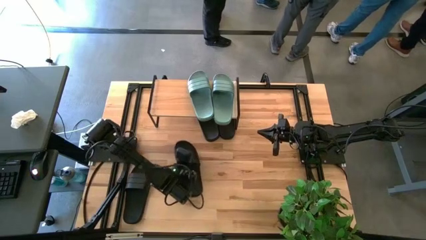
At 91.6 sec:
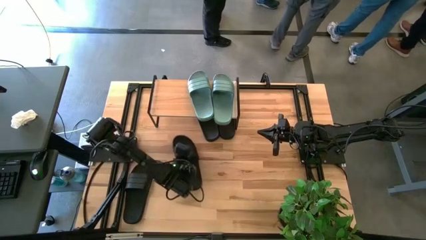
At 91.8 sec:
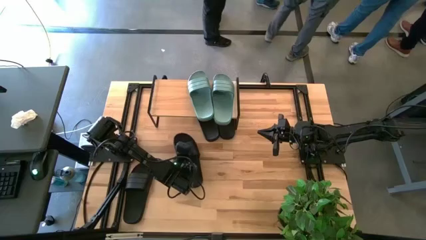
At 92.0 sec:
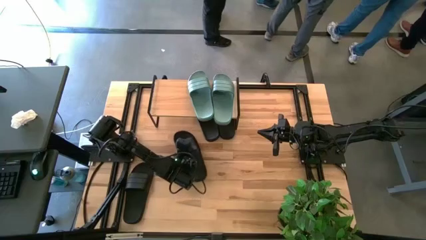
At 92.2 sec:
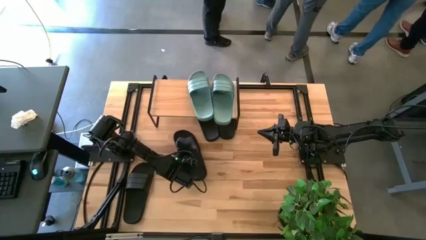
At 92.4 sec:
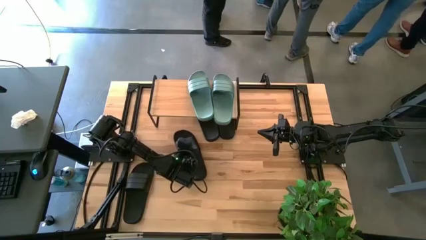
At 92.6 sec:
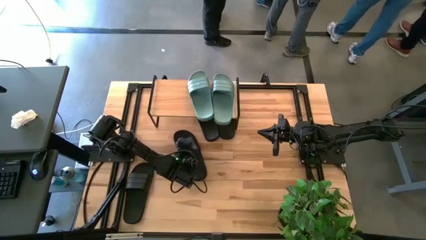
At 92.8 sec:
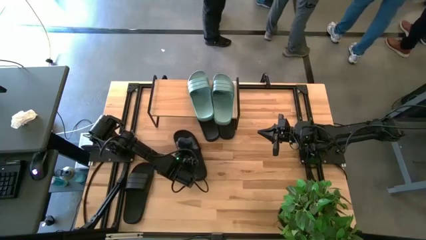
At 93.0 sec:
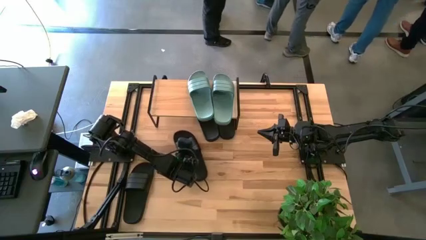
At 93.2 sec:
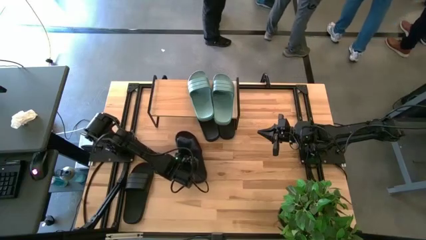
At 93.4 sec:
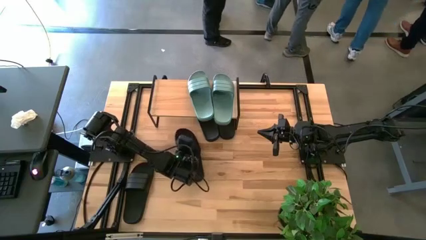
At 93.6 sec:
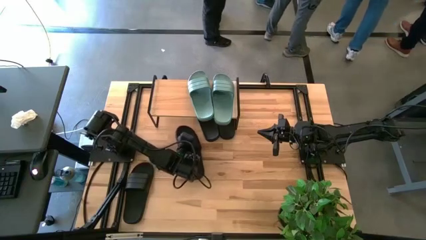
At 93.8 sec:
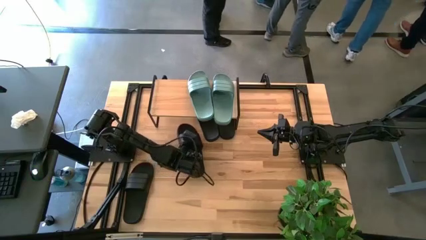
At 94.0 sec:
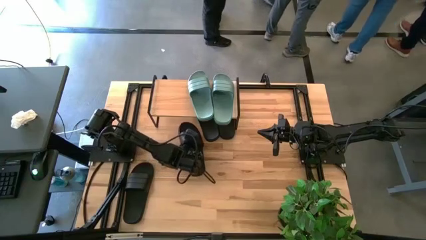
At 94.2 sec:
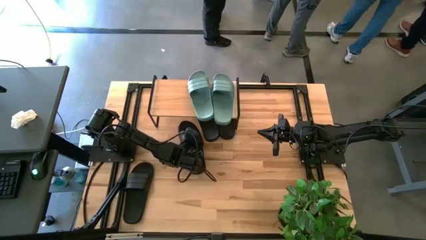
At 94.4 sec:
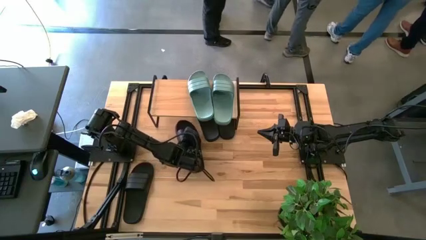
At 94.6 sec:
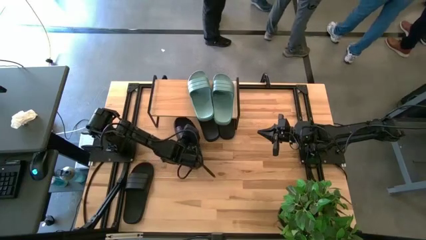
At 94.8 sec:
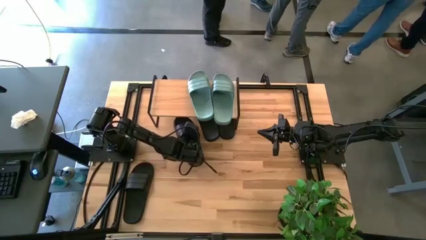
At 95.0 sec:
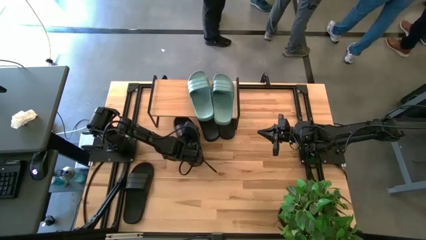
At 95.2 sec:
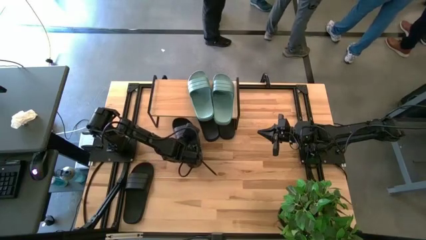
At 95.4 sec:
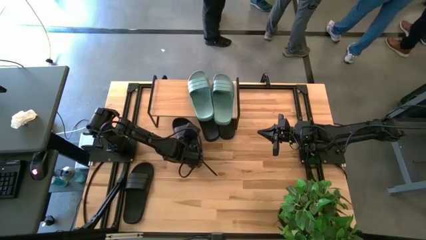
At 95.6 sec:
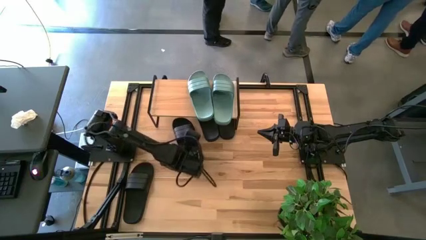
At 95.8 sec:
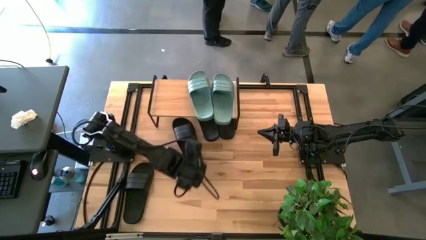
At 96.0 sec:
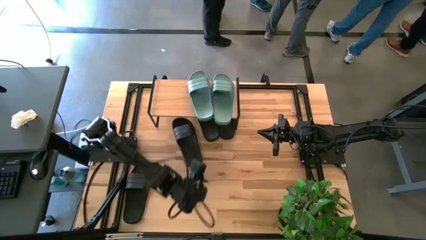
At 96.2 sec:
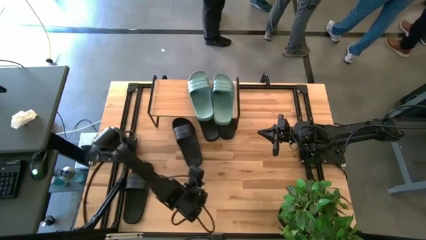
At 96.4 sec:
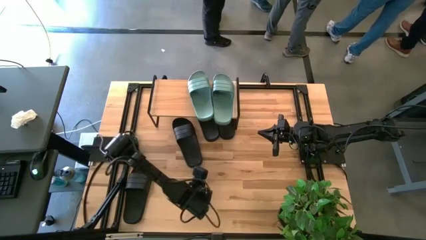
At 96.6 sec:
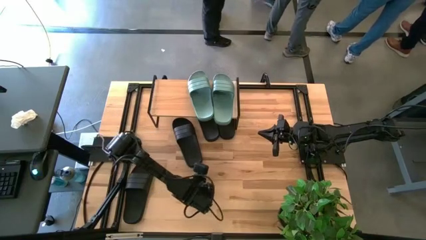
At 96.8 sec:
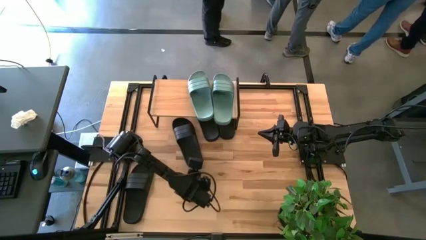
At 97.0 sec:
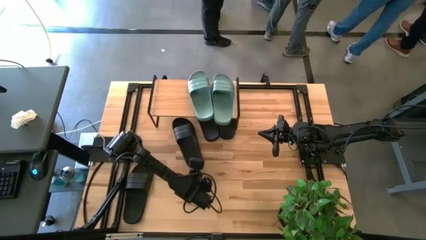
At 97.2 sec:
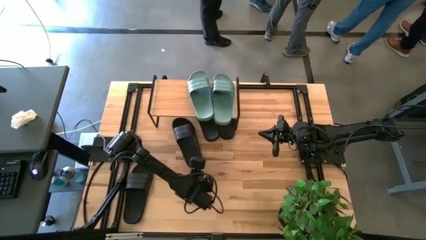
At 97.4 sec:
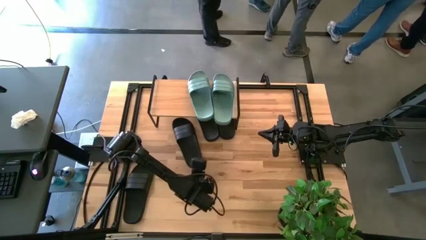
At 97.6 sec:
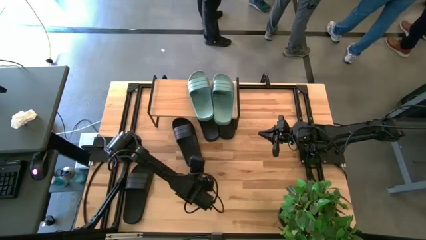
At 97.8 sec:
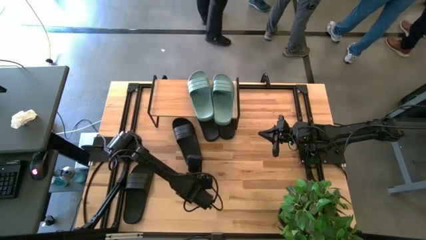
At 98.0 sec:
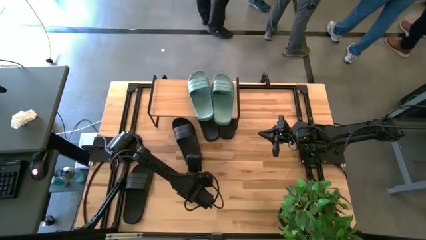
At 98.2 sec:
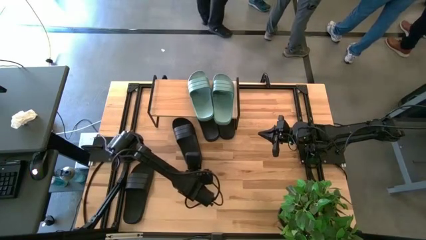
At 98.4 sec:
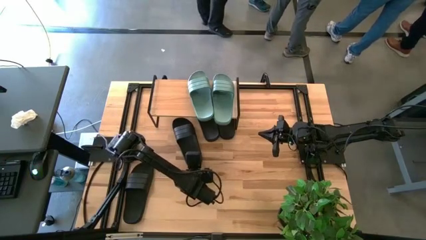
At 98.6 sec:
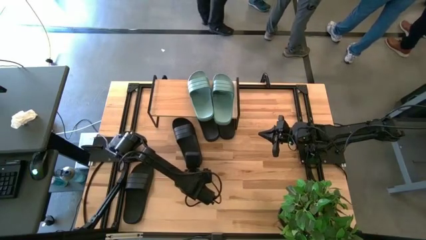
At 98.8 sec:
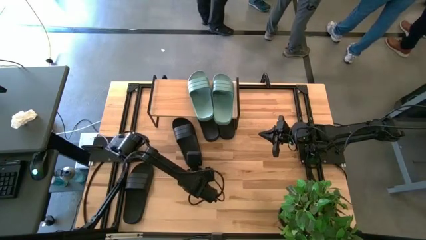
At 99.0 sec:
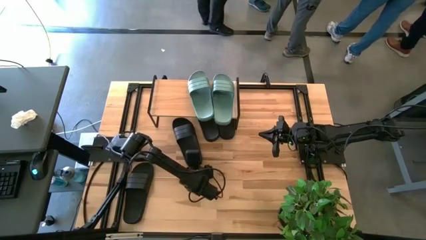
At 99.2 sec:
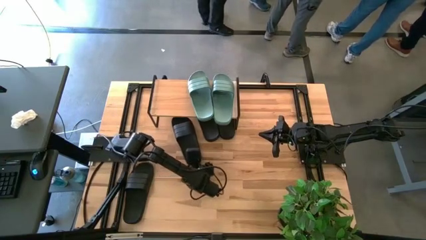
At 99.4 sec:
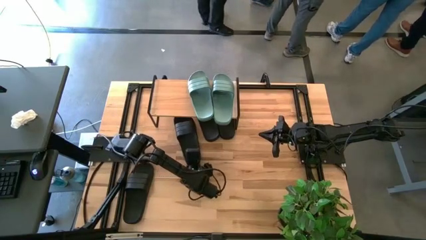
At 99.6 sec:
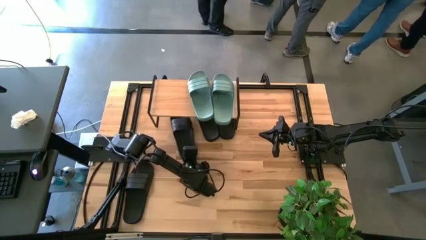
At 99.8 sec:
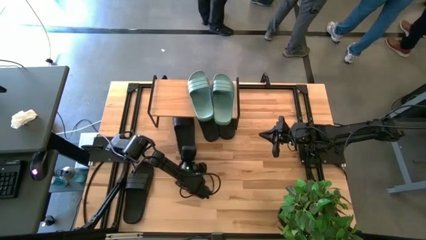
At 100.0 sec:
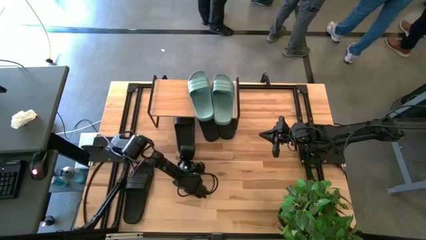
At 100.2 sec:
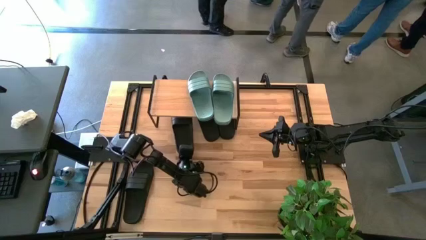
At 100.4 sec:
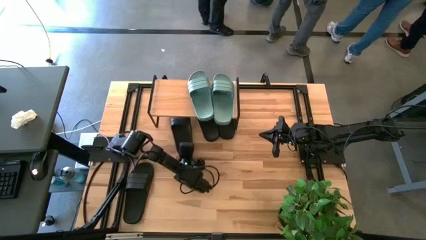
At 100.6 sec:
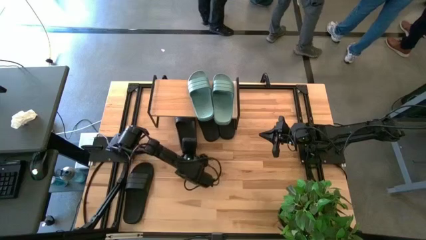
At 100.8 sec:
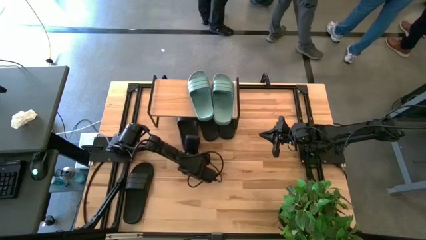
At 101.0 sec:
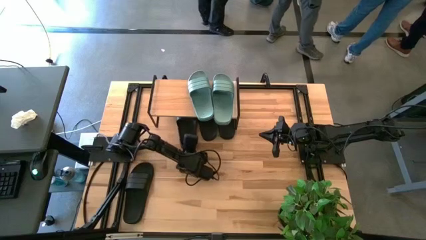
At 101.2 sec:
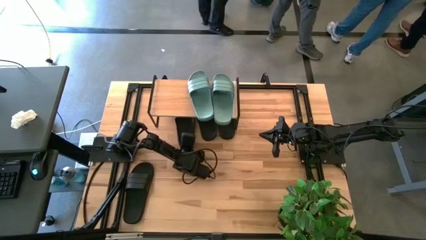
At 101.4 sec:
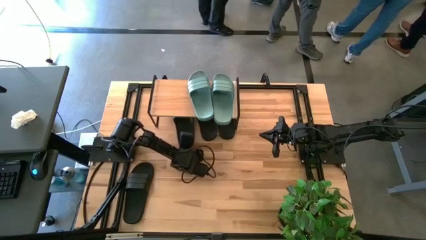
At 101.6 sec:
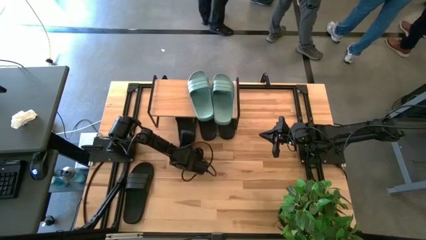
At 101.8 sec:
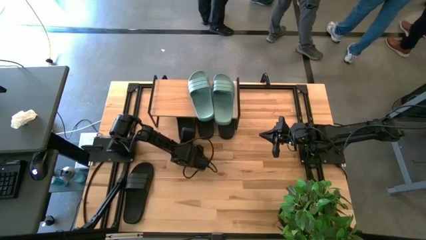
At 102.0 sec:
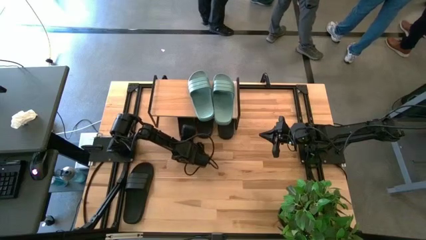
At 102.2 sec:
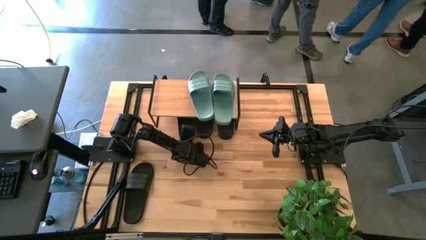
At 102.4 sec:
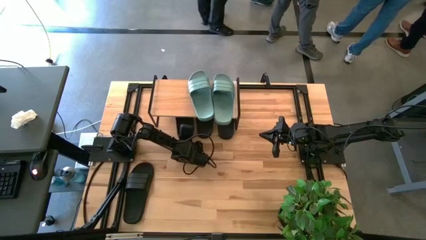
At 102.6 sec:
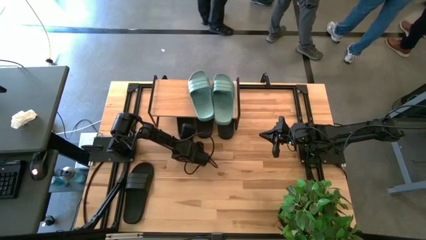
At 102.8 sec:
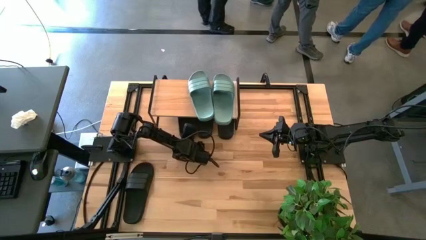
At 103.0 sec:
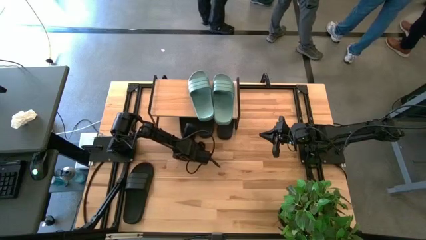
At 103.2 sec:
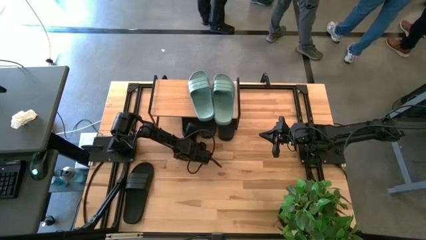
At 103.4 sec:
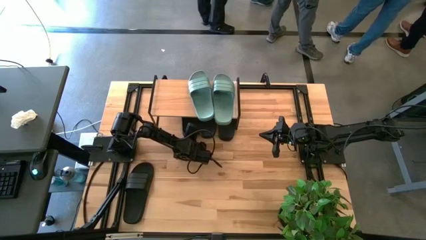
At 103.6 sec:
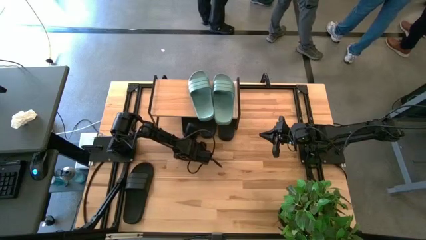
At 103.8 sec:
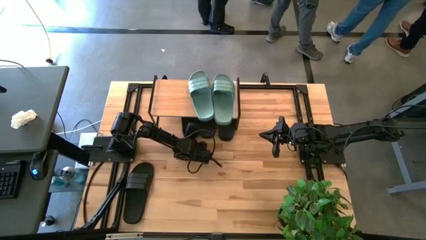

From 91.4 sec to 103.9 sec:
Task: Pick and place slides into the shelf
Put the black slide under the shelf

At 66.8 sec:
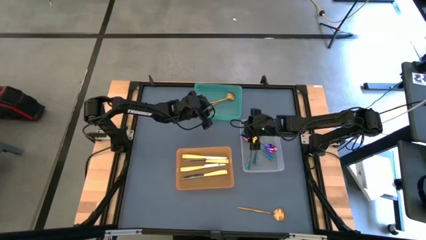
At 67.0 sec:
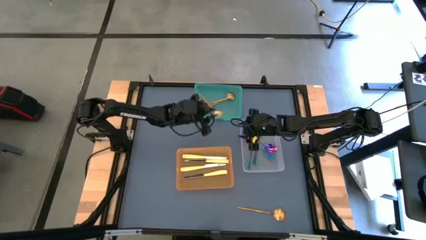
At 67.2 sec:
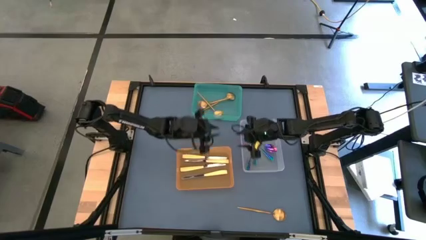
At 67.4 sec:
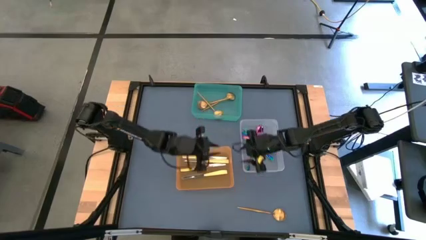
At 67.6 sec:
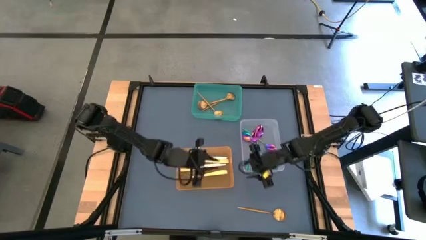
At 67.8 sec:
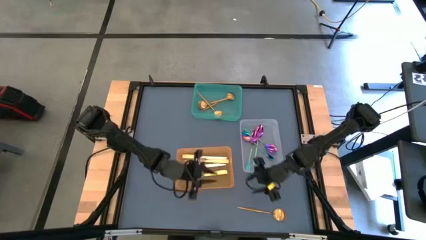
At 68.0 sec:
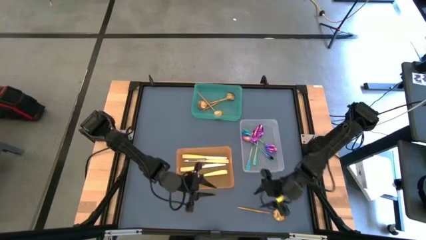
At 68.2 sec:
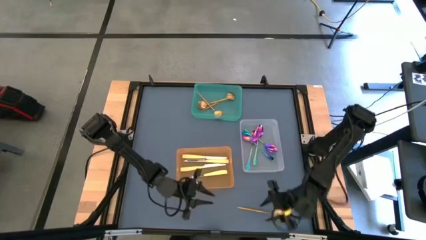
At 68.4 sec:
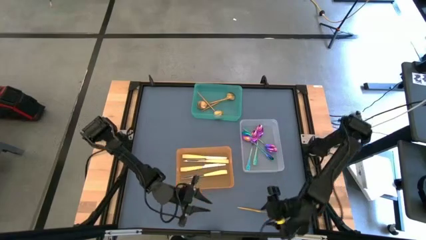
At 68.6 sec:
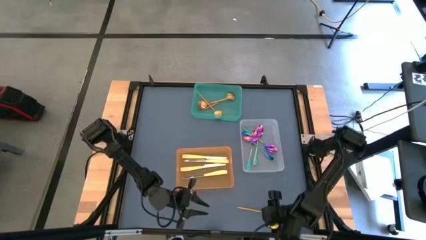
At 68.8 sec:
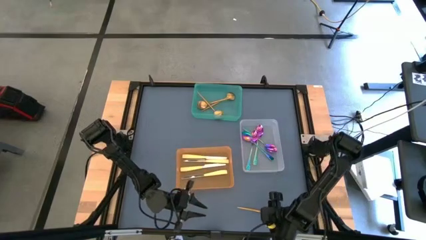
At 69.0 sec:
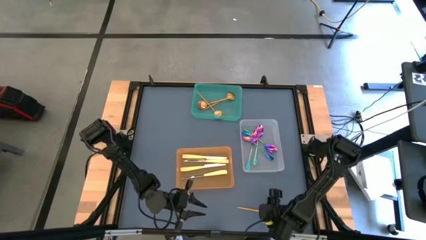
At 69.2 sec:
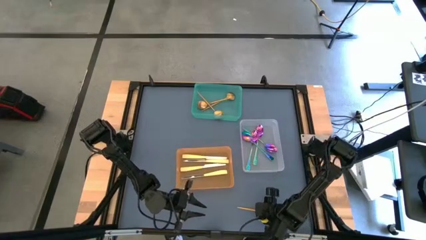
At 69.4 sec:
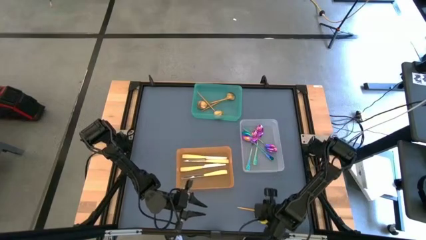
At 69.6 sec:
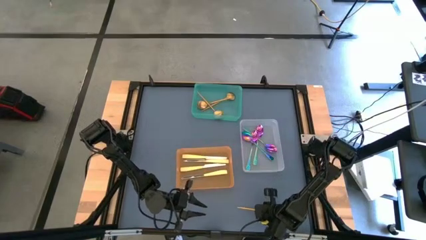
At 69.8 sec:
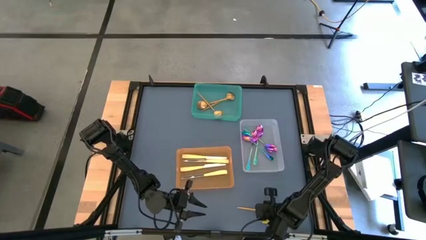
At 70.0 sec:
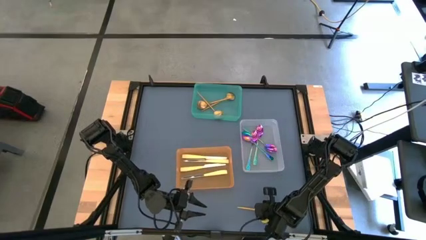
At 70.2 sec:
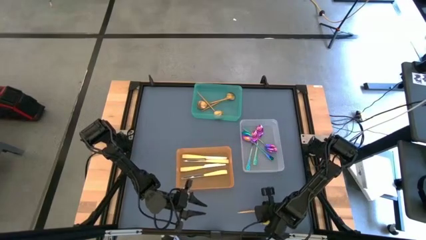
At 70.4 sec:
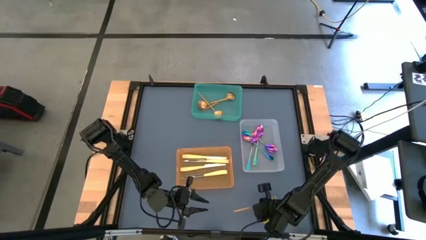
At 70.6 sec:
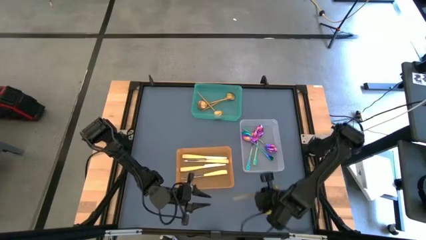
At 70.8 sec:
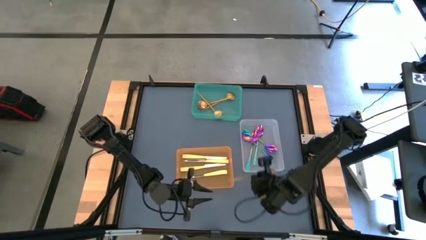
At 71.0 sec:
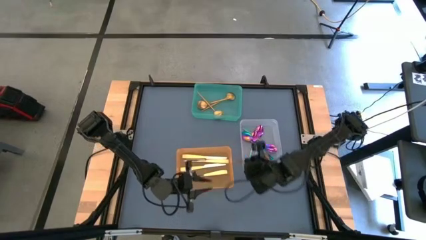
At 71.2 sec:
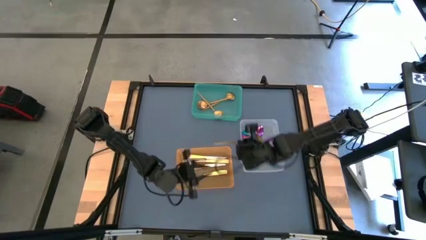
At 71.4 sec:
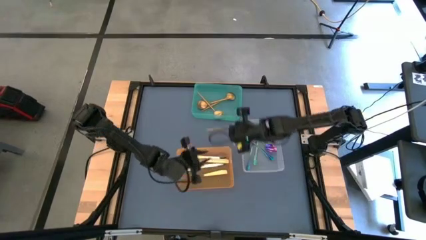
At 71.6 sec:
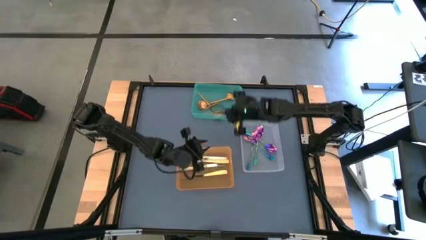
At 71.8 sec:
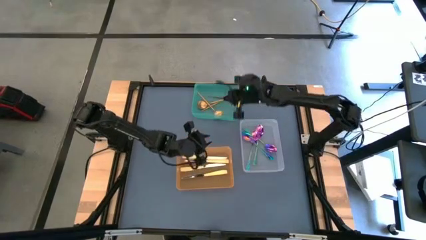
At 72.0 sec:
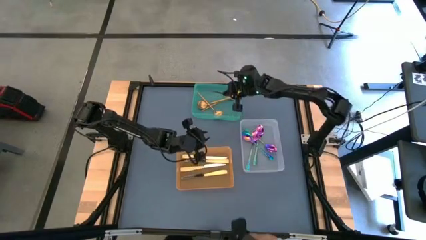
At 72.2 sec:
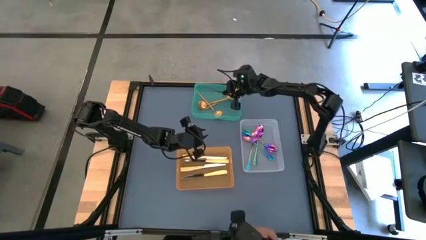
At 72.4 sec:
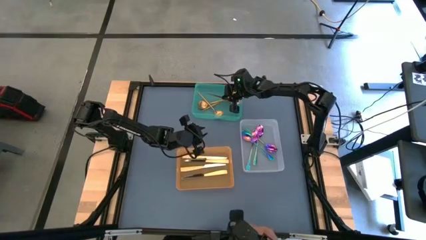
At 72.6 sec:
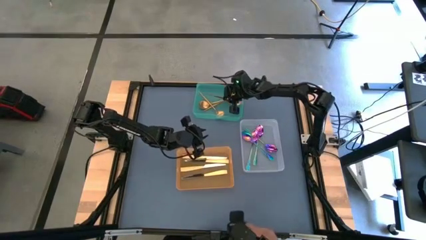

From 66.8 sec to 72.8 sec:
Task: Sort silverware by color (type)
Put the gold spoon into the green bin
